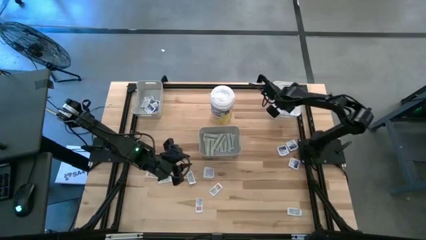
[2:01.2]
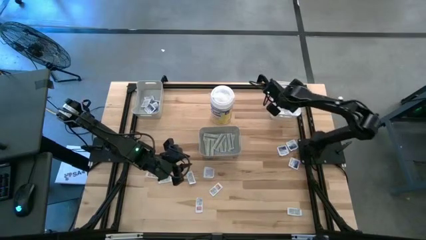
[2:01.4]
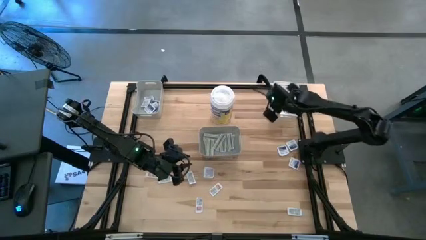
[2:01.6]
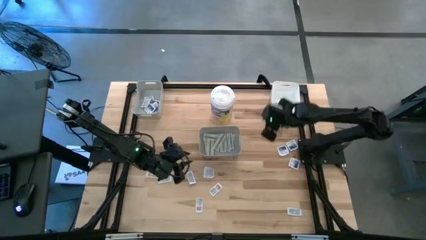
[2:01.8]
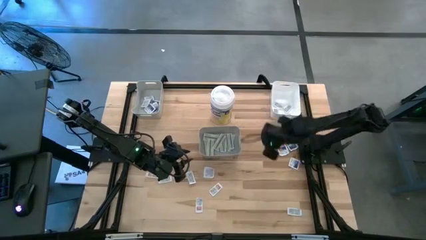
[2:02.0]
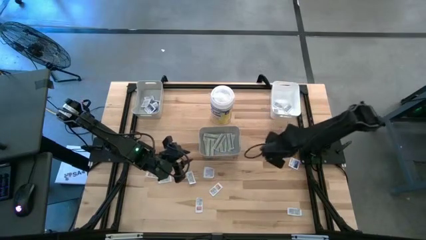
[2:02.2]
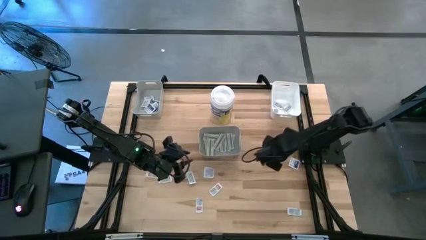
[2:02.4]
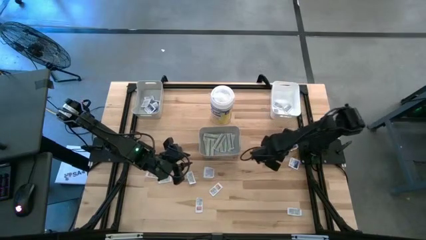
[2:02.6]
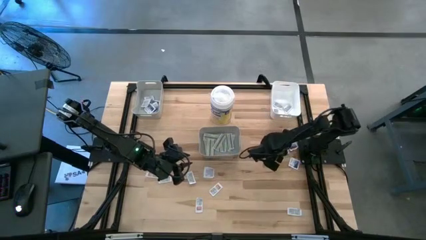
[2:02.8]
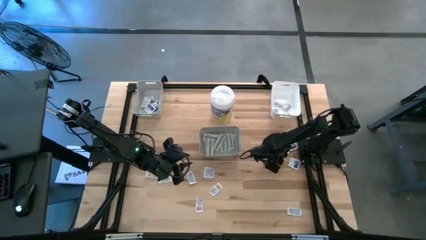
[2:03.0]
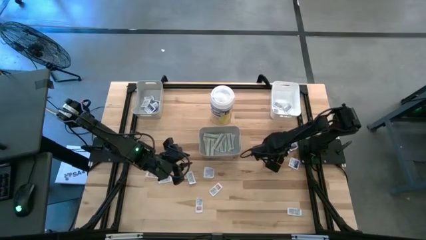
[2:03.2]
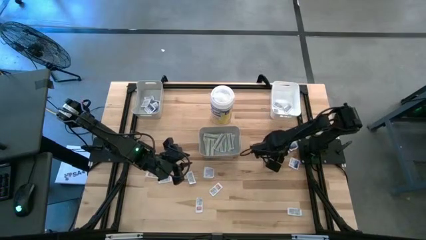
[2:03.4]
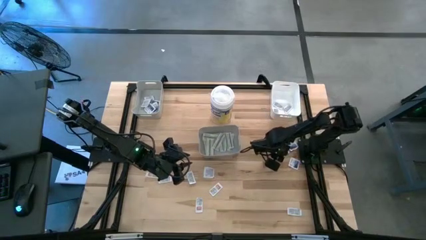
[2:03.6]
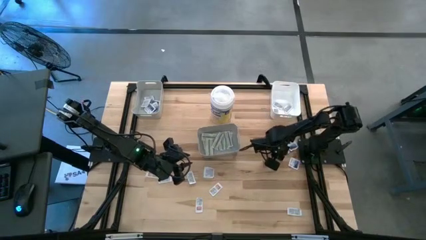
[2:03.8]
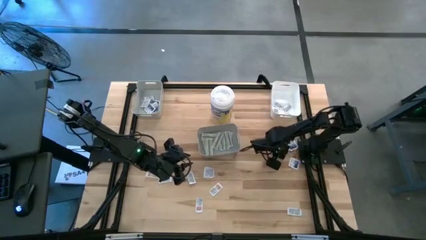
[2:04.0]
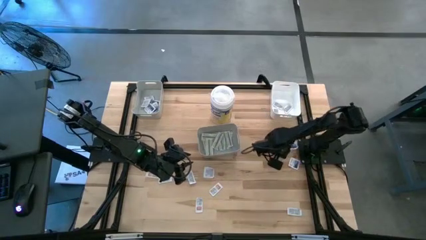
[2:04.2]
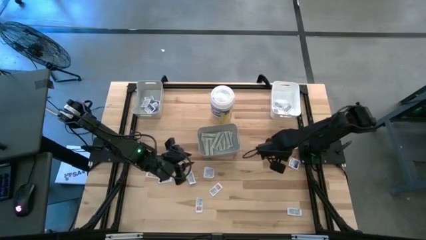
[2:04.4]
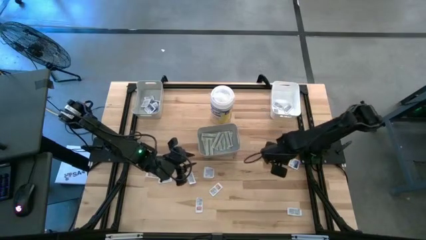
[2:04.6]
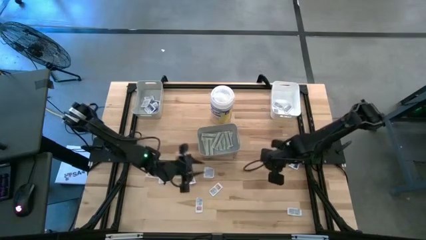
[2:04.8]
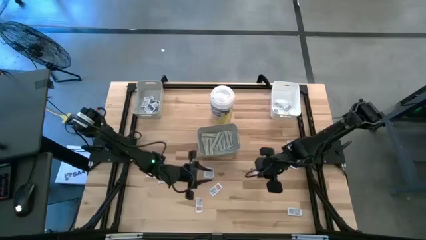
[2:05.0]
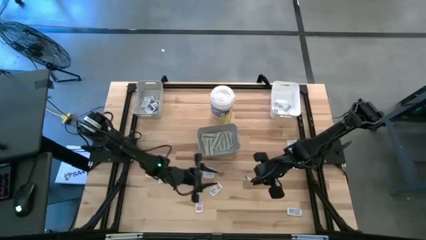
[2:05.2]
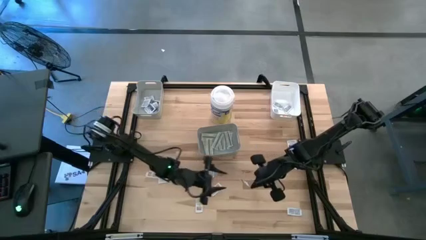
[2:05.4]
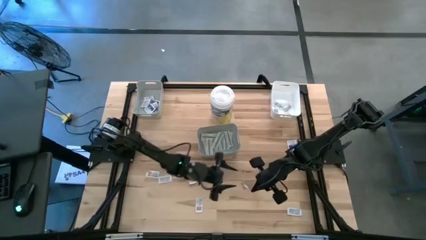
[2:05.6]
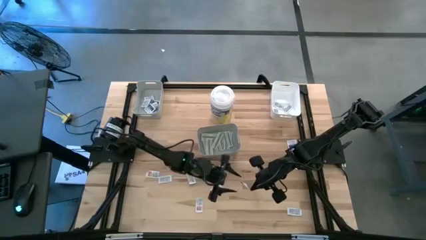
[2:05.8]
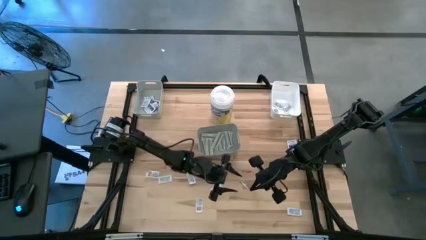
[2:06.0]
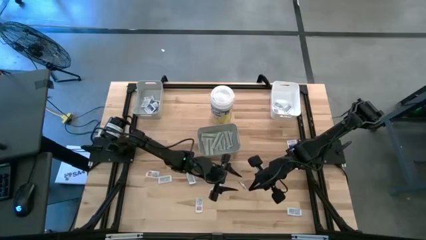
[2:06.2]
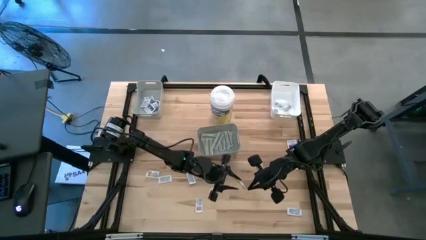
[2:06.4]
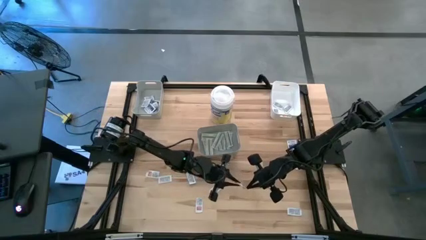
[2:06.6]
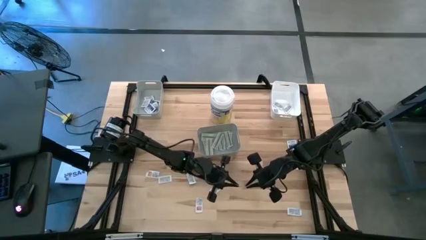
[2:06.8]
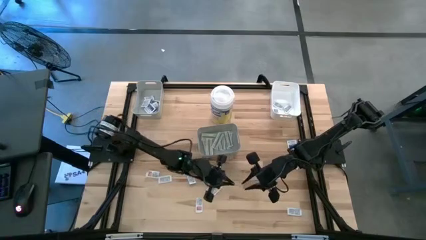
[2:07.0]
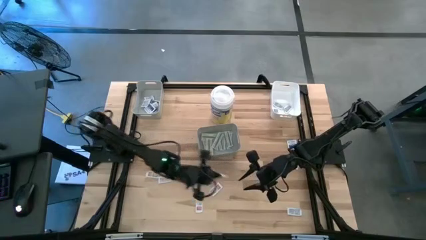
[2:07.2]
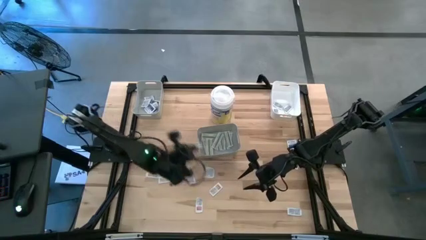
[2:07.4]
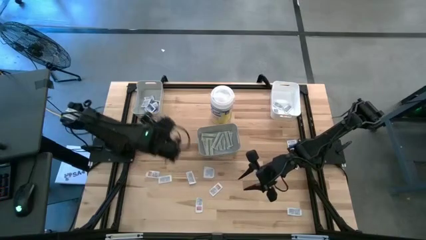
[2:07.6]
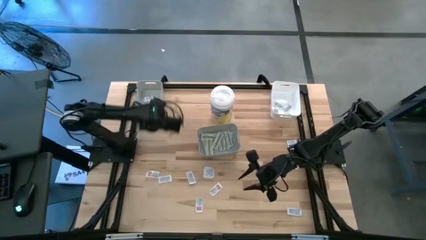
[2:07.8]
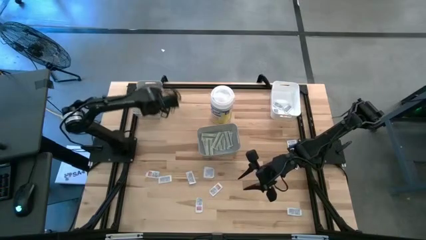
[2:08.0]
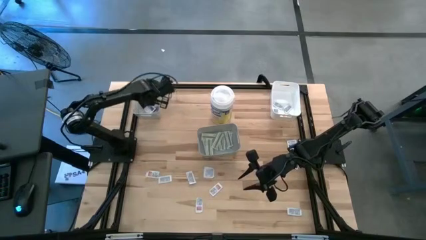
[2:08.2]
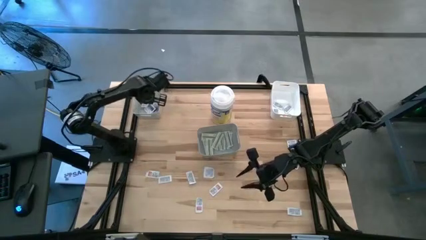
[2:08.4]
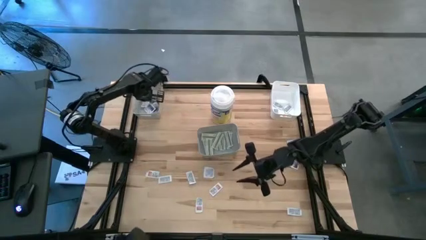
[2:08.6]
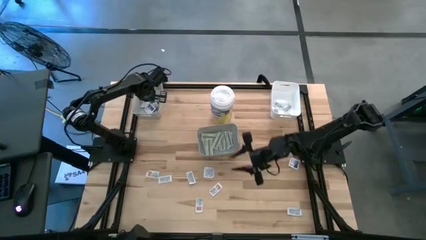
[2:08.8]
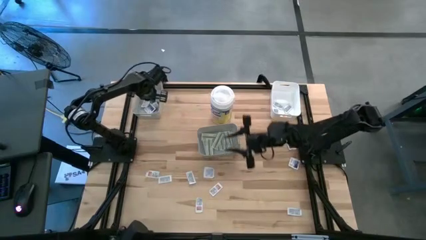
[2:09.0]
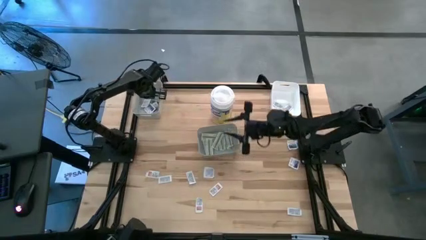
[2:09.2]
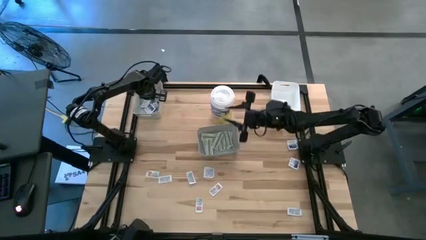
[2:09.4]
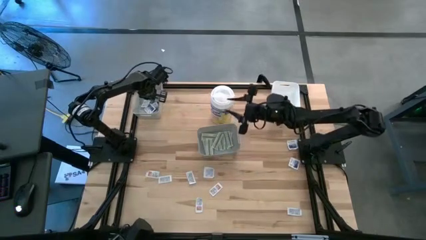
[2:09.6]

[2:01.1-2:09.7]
Task: Pick & Place First Aid Supplies
Put the alcohol pad into the top gray bin

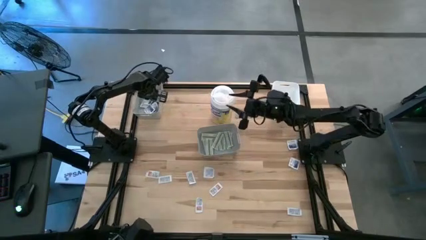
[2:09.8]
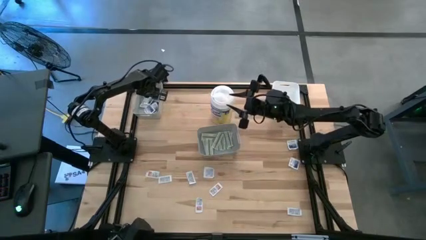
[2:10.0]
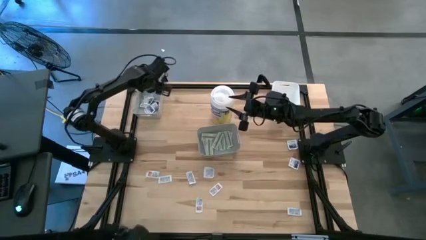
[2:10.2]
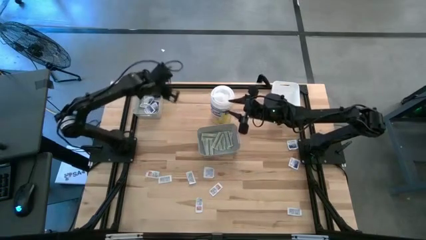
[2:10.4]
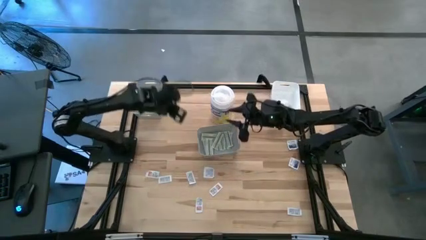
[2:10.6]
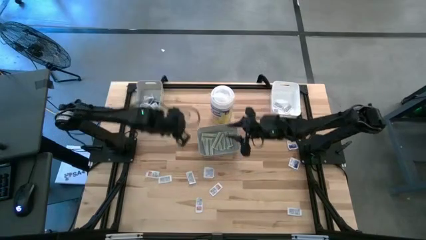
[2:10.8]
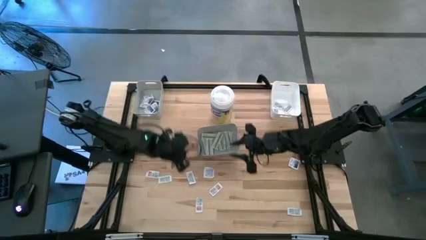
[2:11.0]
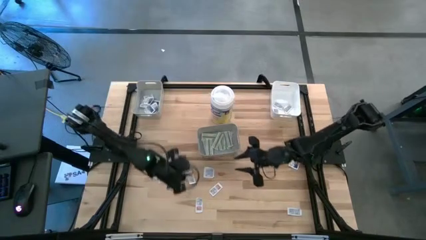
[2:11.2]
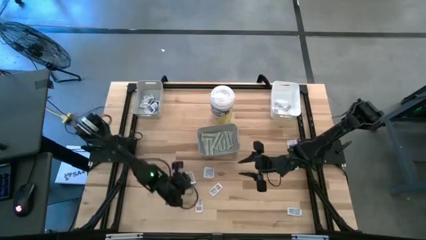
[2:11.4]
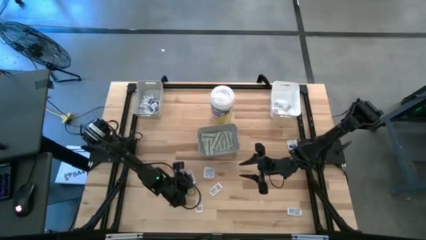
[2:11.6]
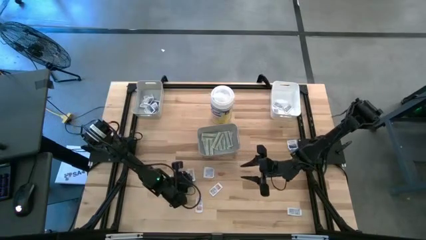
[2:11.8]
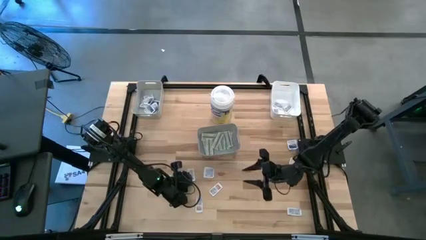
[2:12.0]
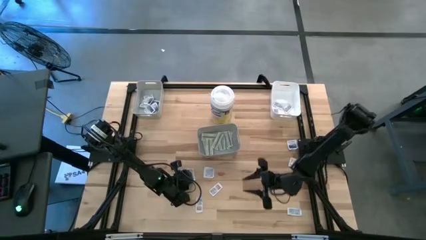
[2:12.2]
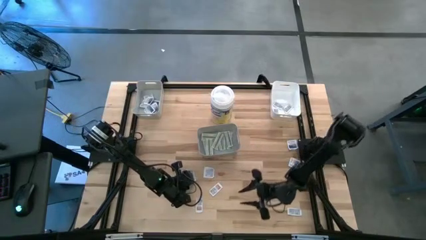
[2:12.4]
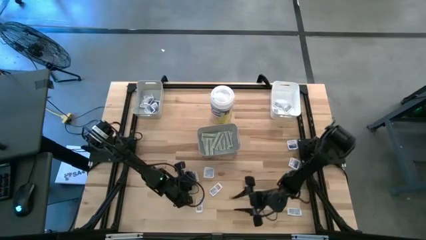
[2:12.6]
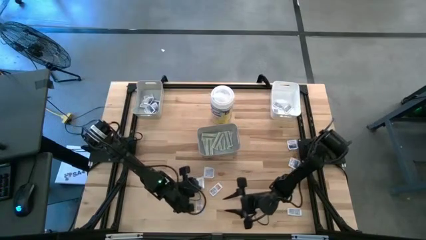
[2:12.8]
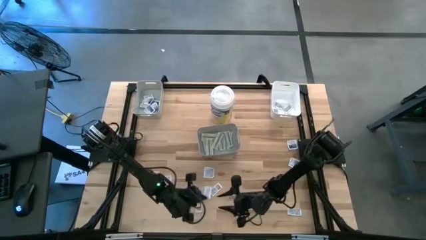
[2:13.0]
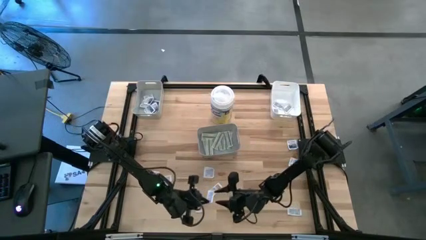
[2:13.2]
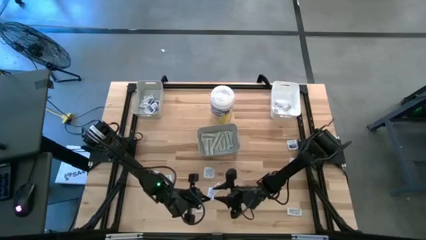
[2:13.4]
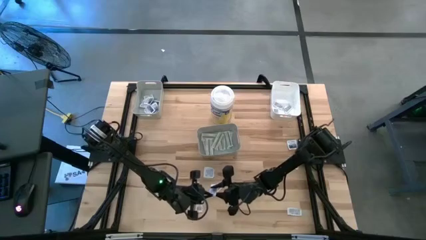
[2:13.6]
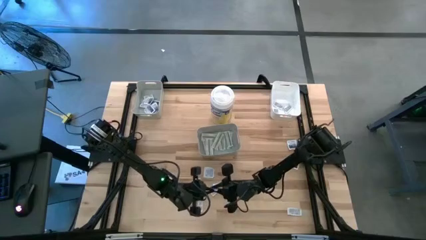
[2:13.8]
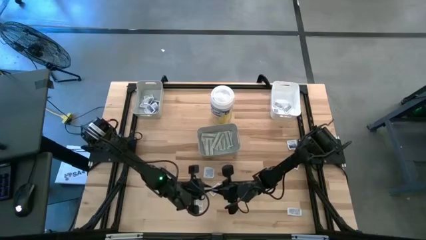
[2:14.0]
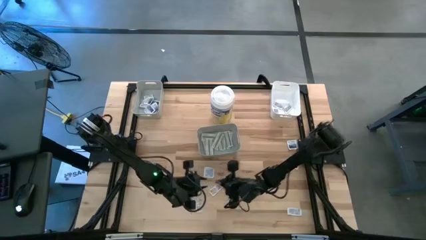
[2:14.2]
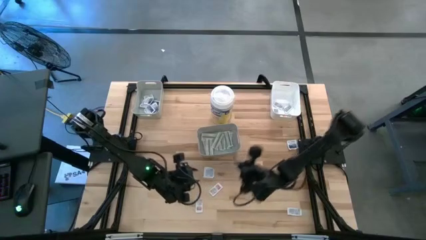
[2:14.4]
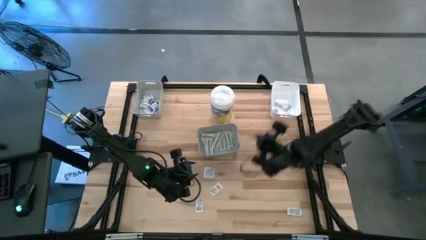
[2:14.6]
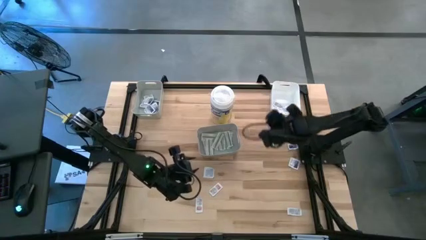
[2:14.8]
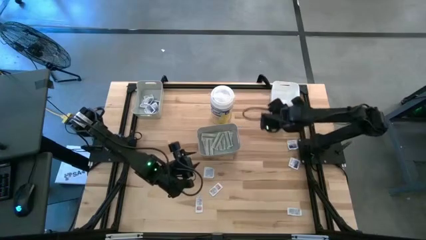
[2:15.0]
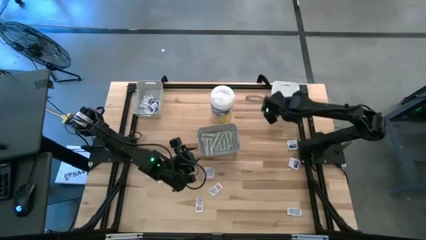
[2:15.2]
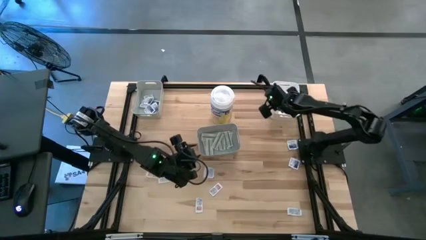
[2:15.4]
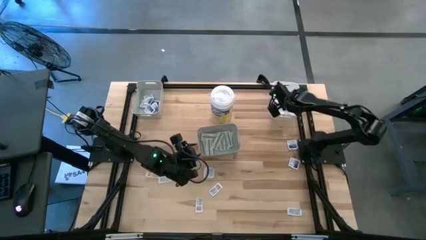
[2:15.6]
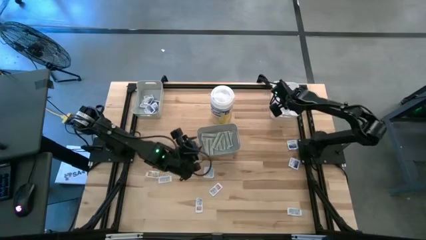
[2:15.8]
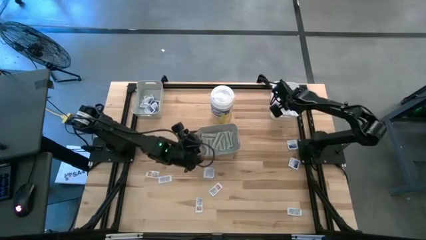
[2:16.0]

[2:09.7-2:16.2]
Put the ointment pack into the white bin

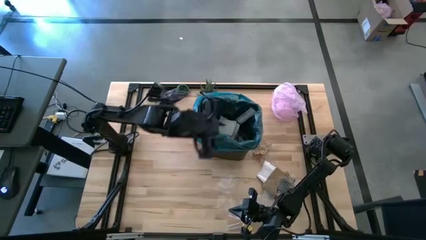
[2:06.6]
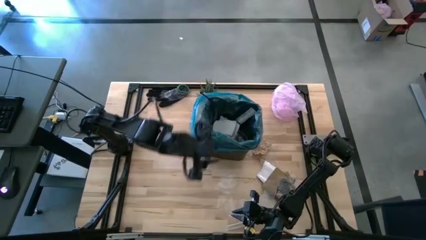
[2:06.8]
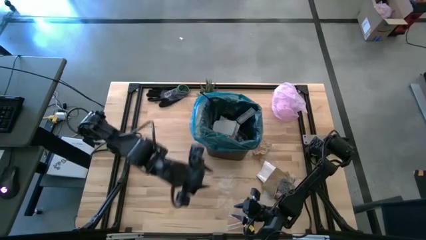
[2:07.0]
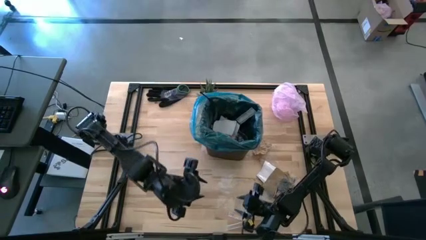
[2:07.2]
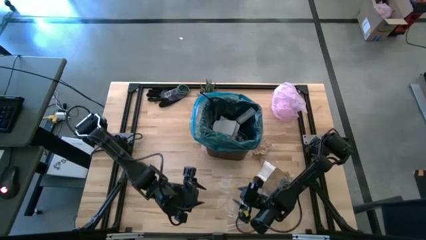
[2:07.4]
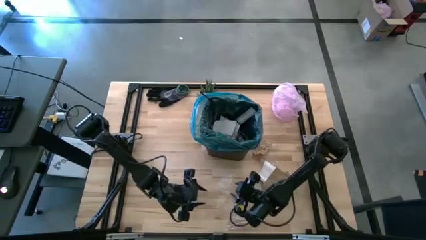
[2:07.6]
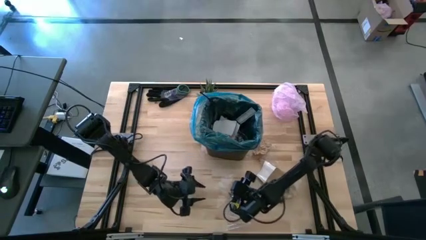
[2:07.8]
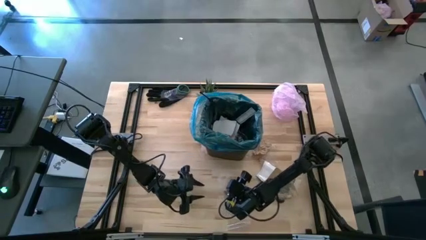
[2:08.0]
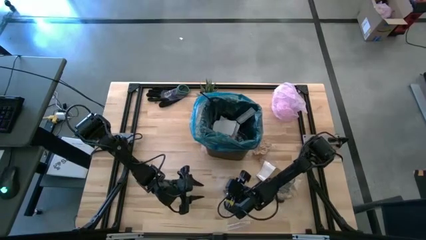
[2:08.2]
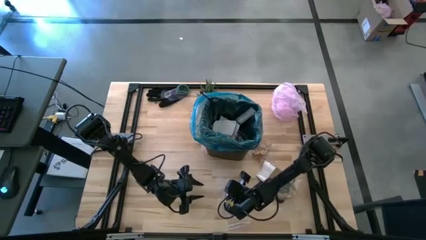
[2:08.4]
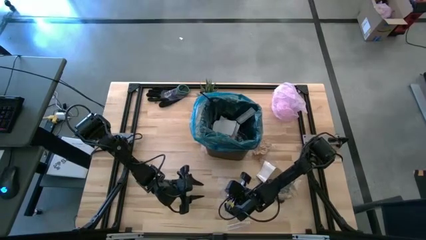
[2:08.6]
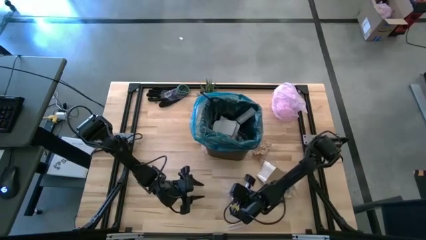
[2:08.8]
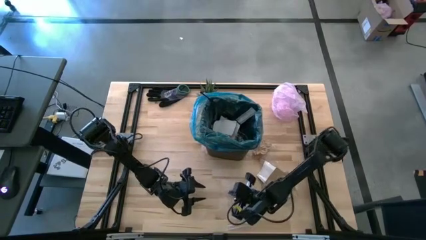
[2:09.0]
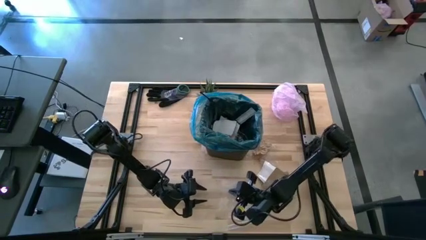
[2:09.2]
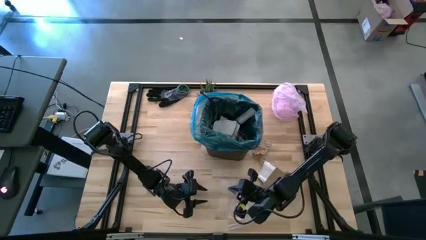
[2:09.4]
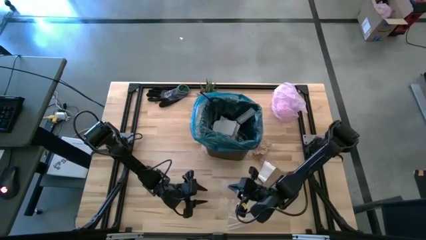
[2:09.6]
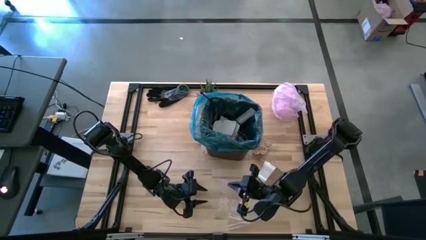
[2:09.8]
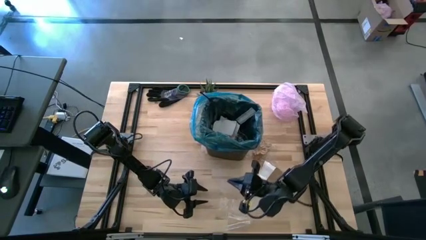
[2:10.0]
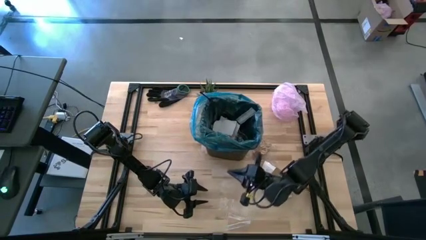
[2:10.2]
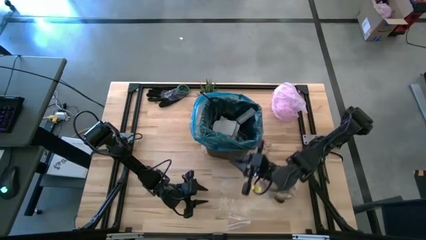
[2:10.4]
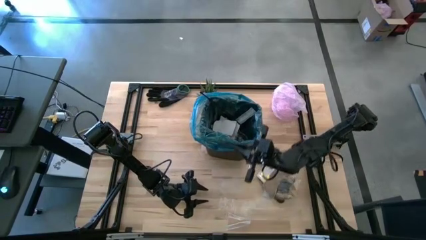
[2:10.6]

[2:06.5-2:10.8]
Task: place trash/remove bag and relplace
Put the transparent plastic into the trash bin
